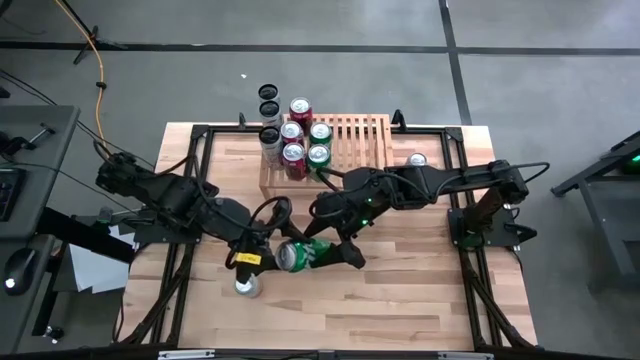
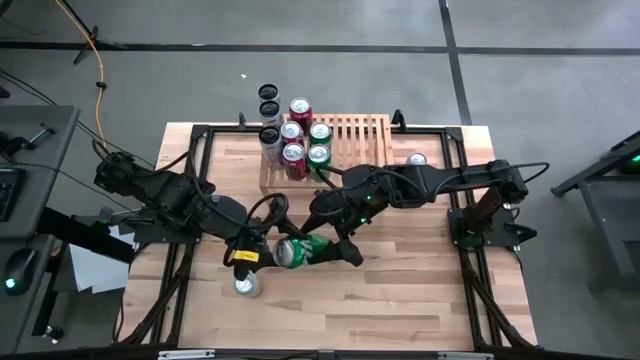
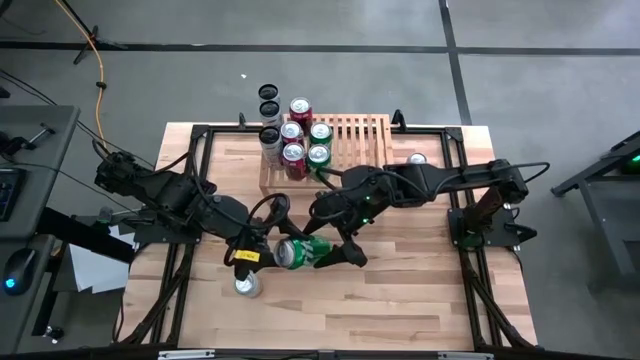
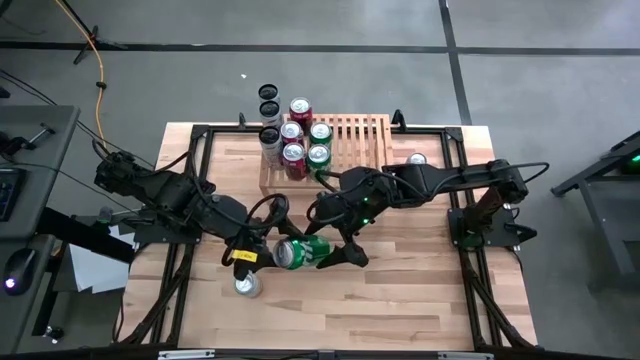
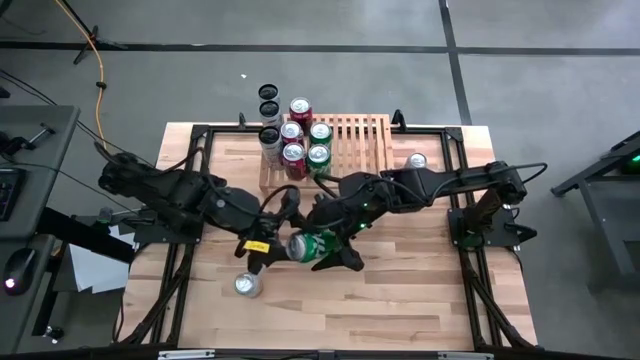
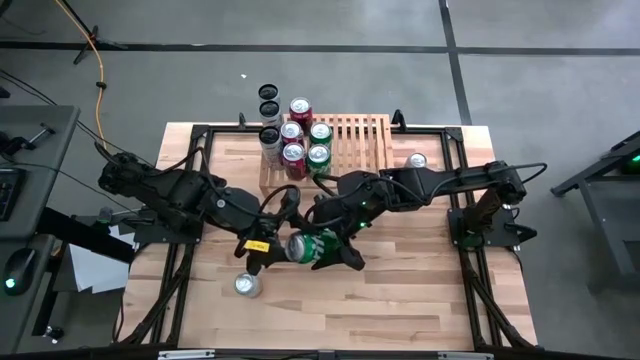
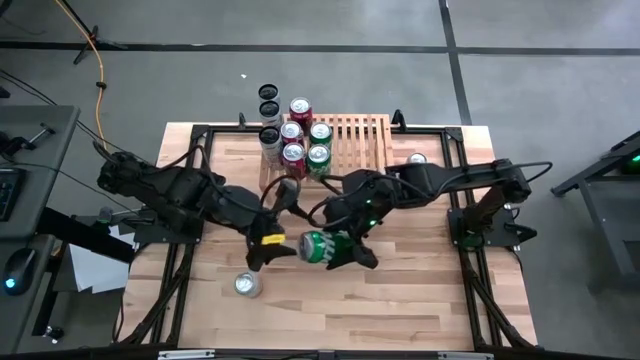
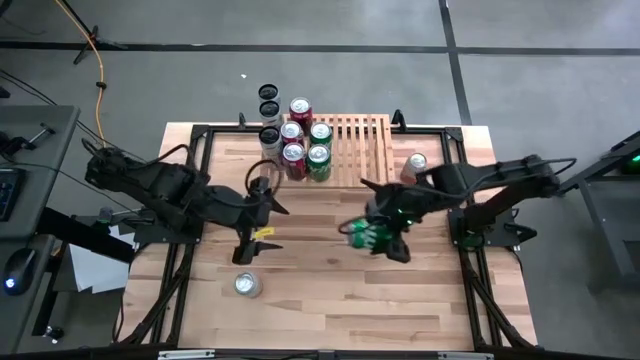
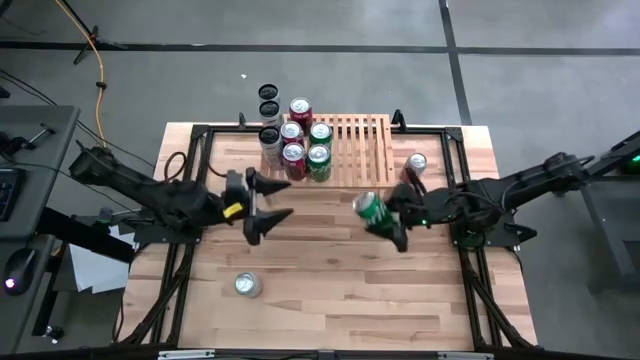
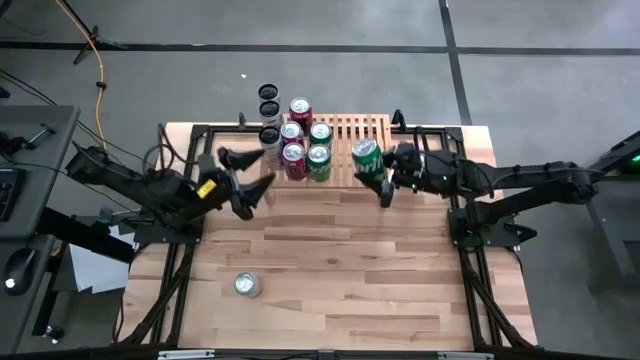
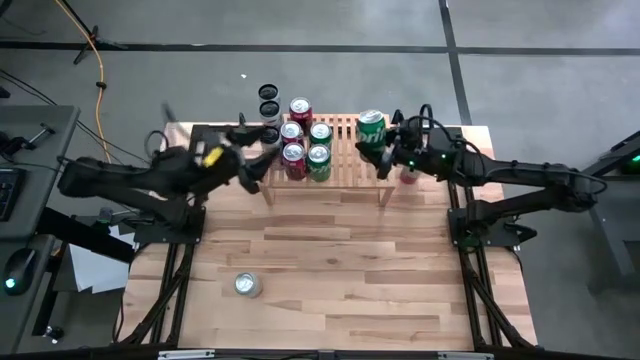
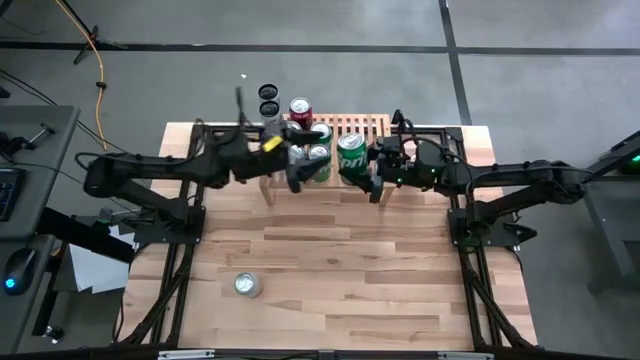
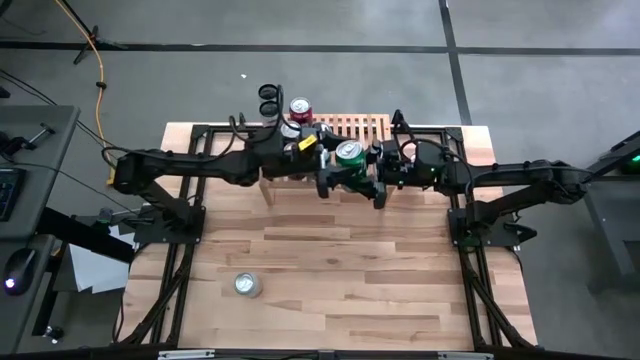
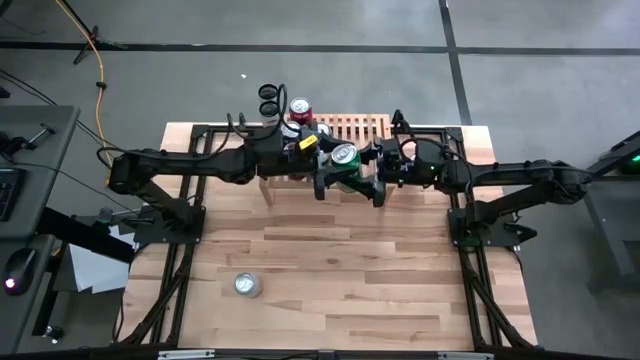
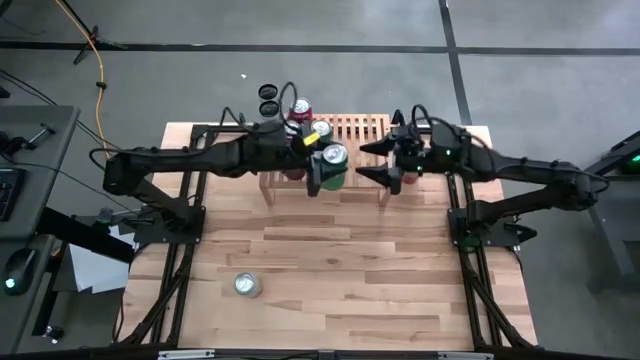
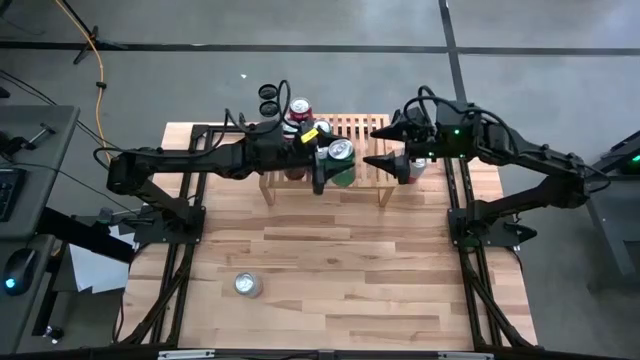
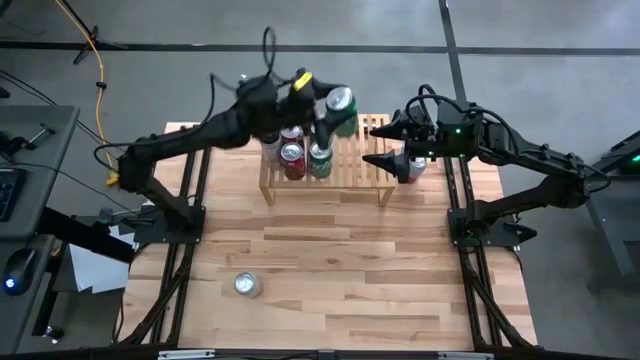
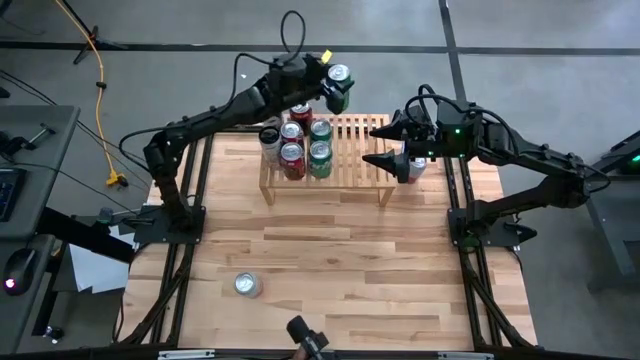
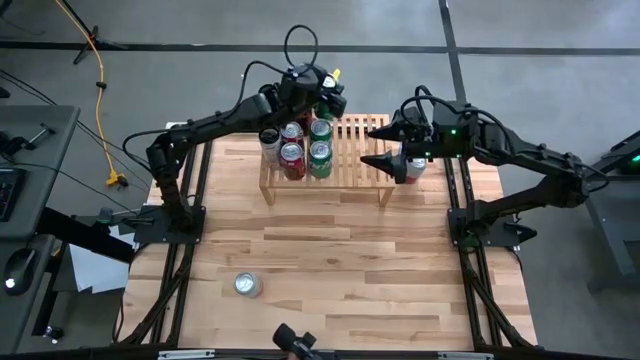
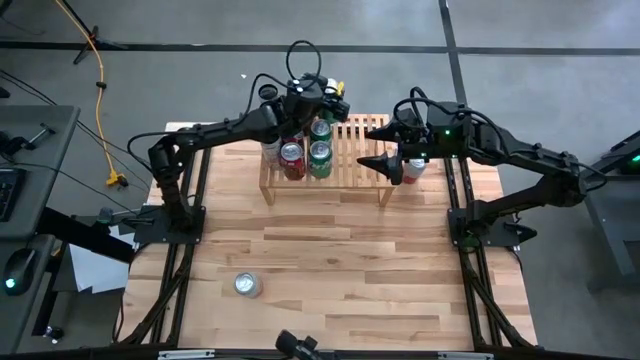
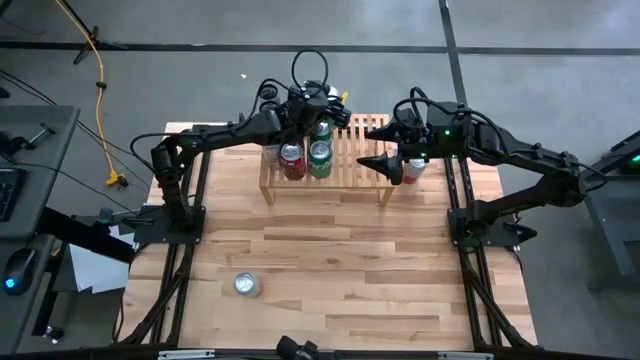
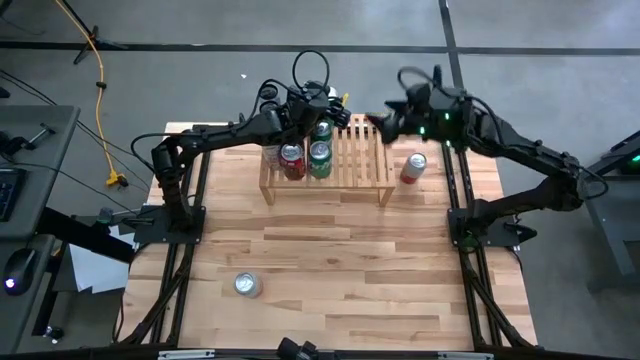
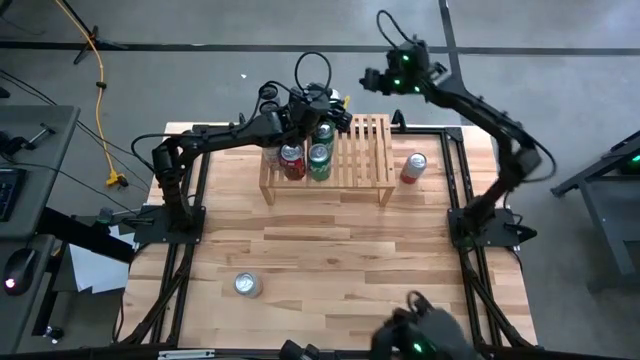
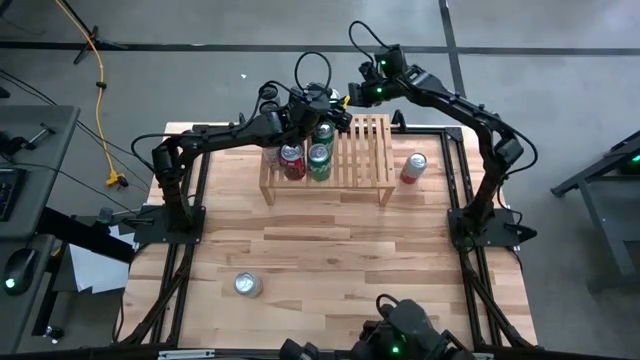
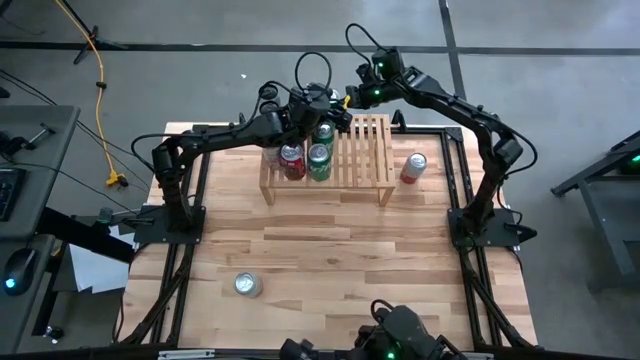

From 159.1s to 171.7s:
Task: Place canned beverage on shelf
Put the green soda can on the shelf aligned with the other green soda cans

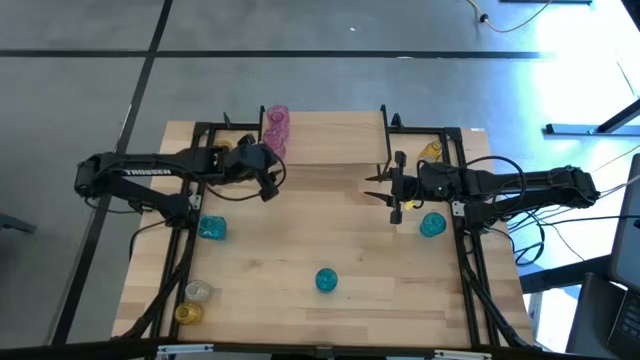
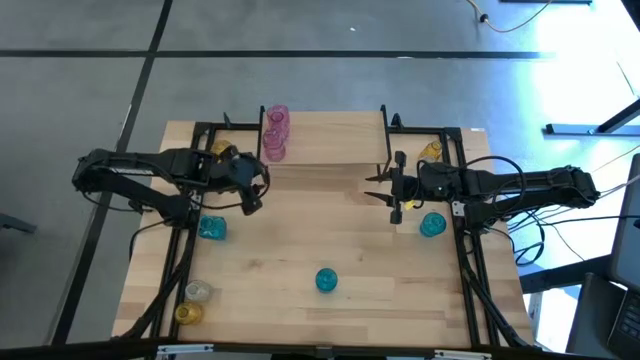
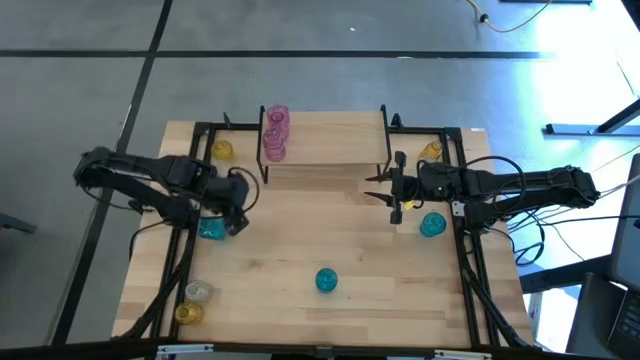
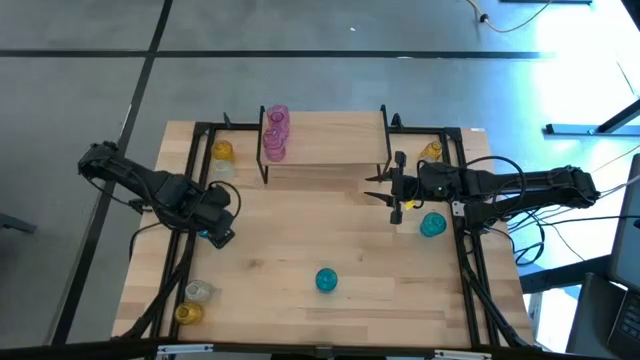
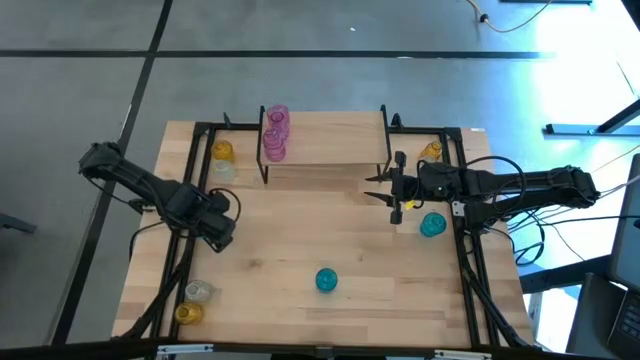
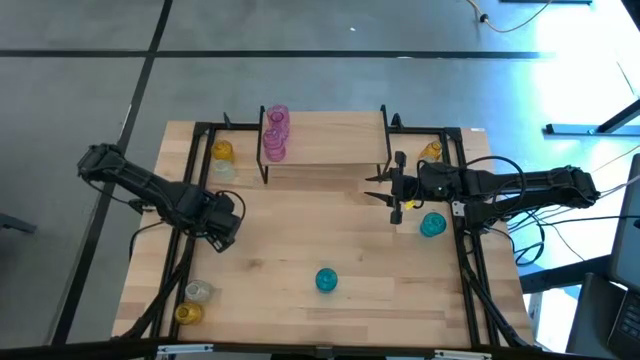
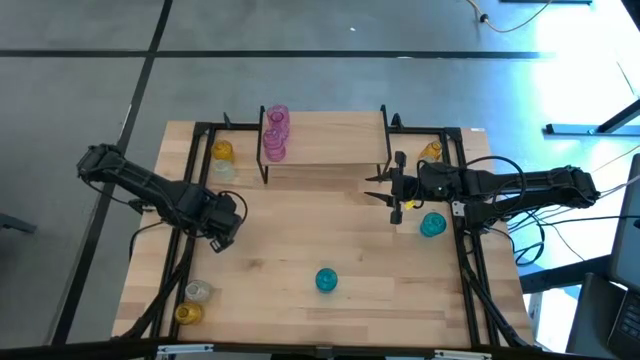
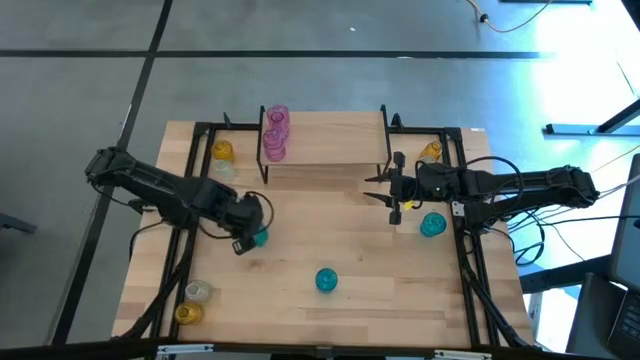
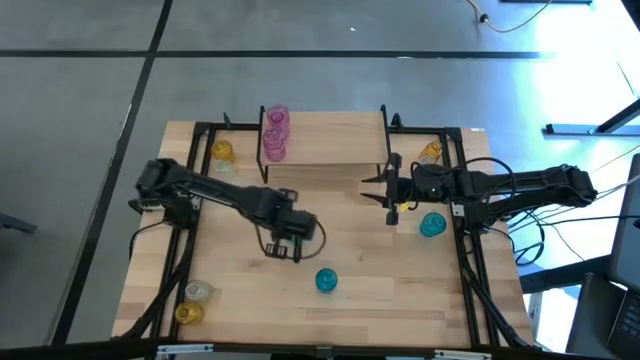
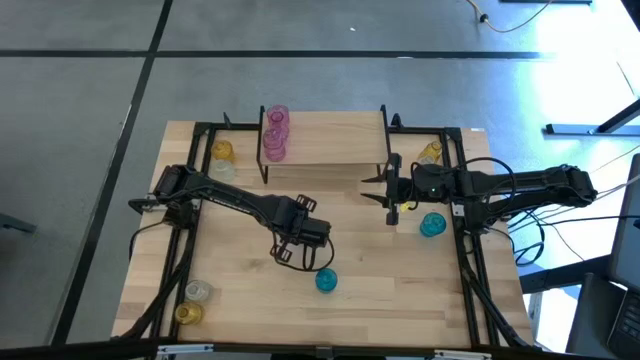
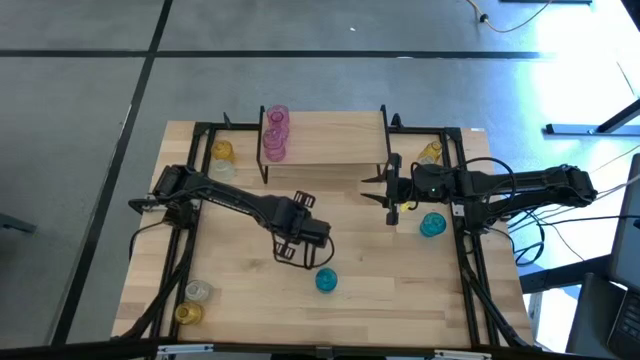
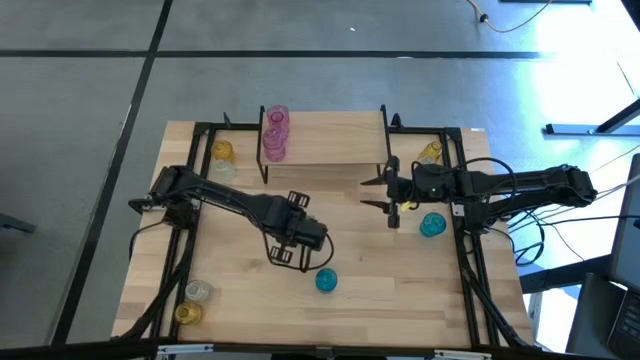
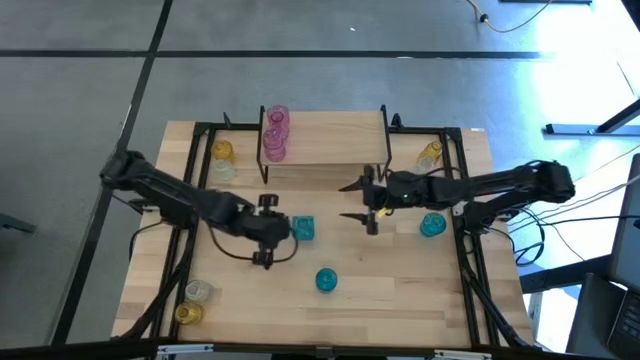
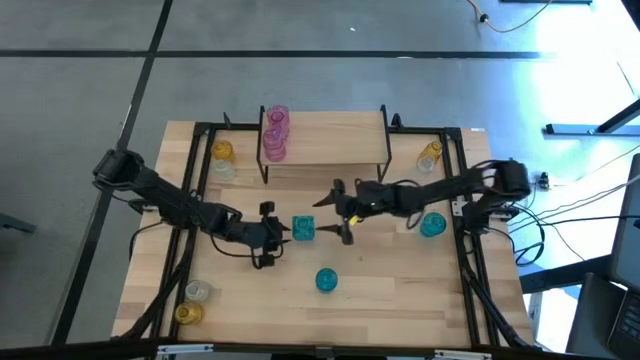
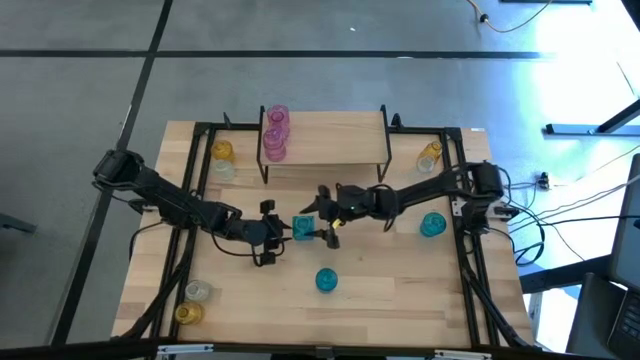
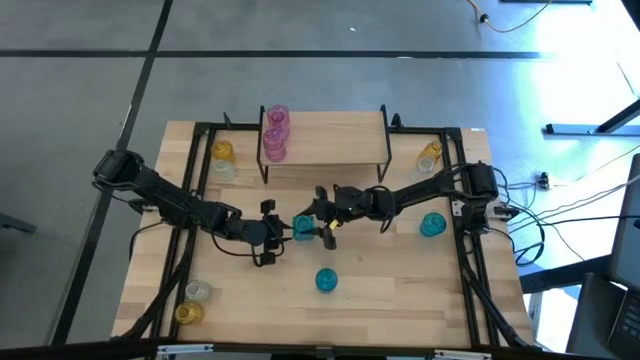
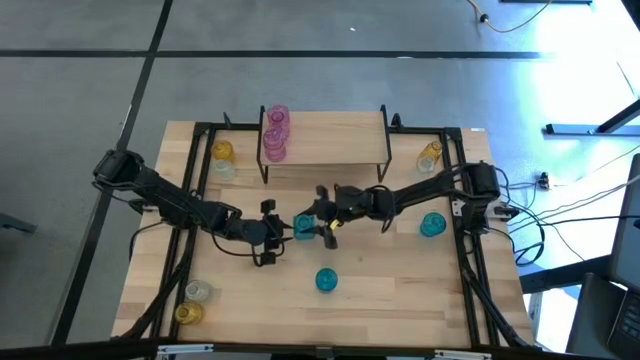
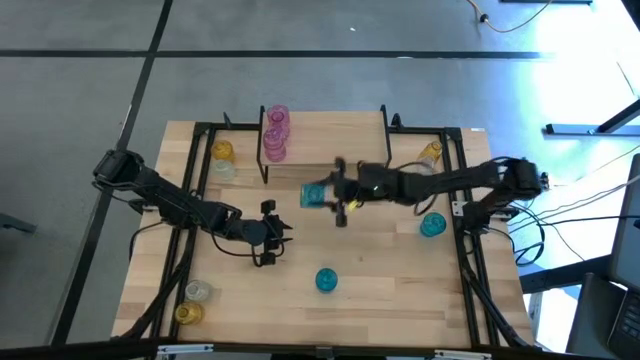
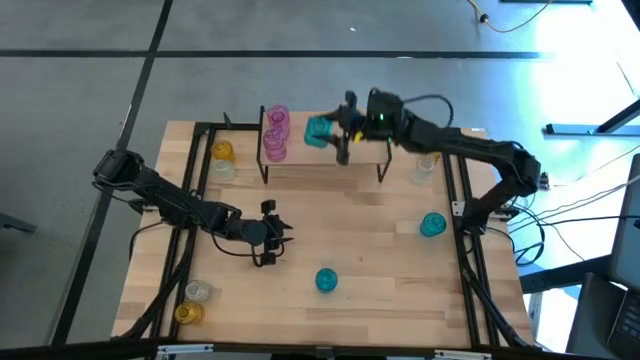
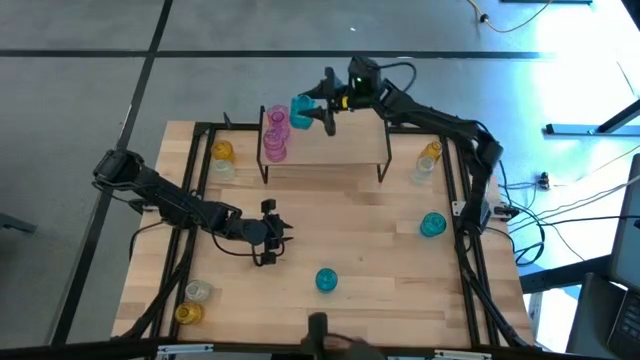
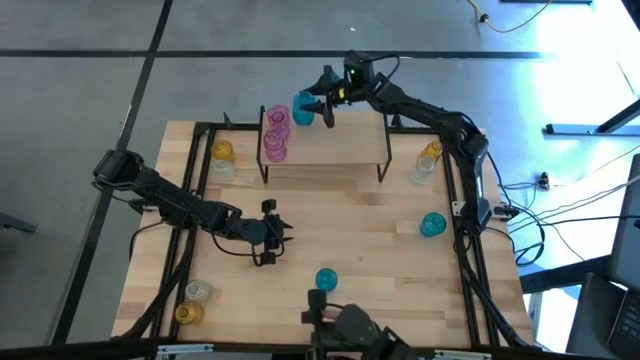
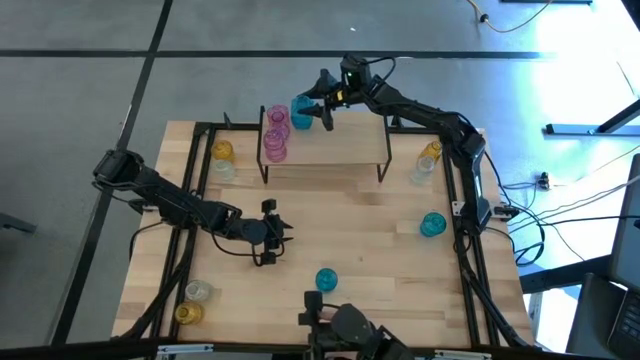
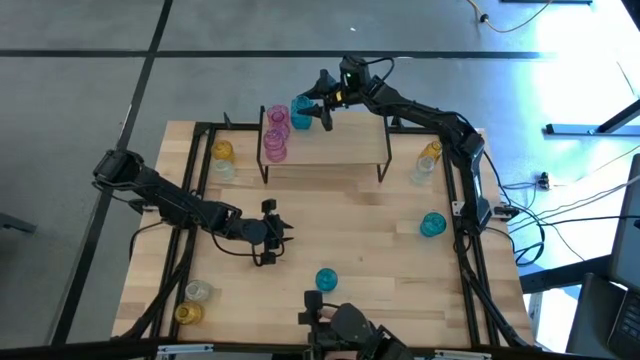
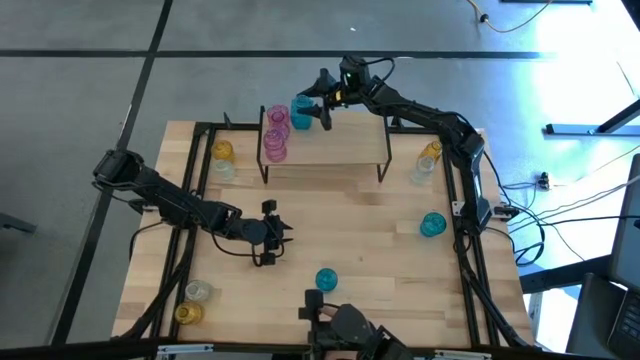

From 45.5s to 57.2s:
Task: sort vases onto shelf
Put the top left blue flower vase on the shelf
